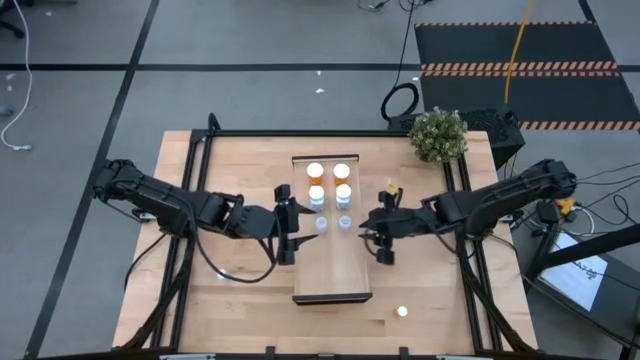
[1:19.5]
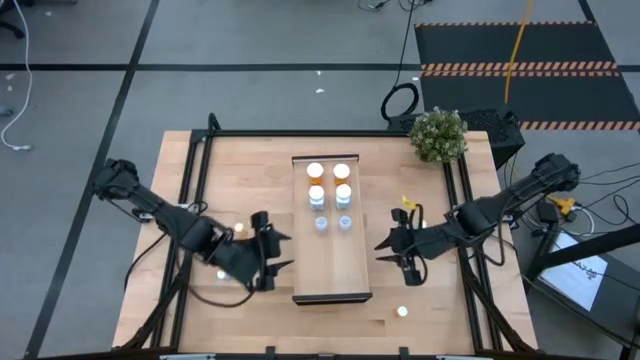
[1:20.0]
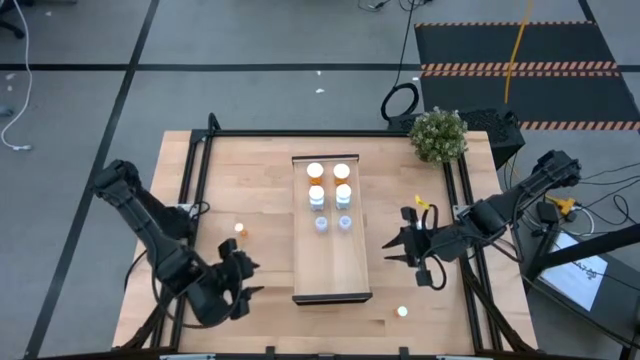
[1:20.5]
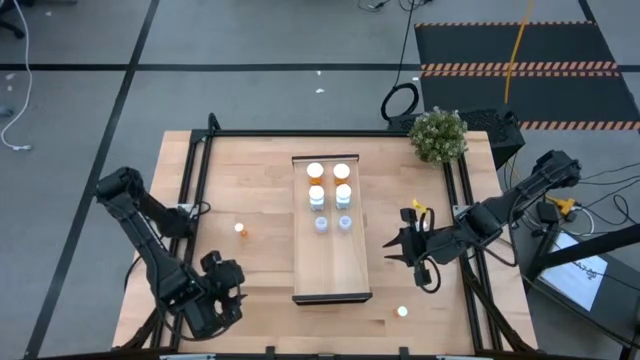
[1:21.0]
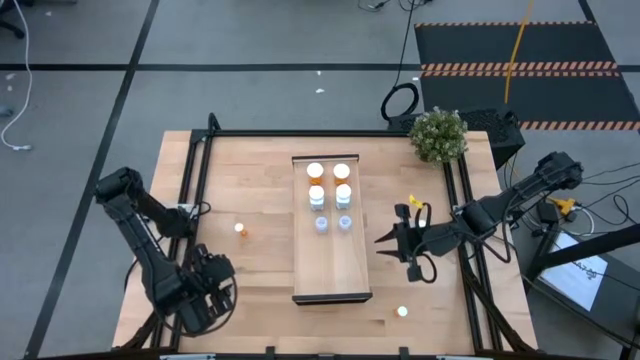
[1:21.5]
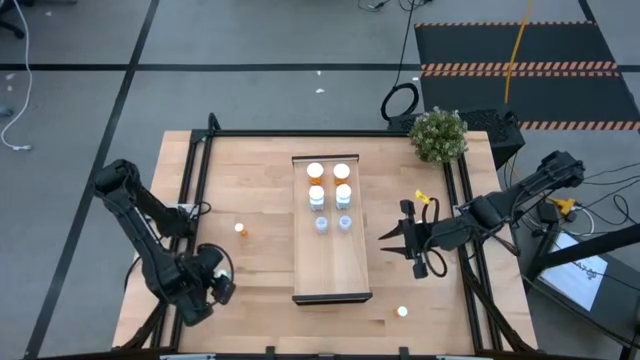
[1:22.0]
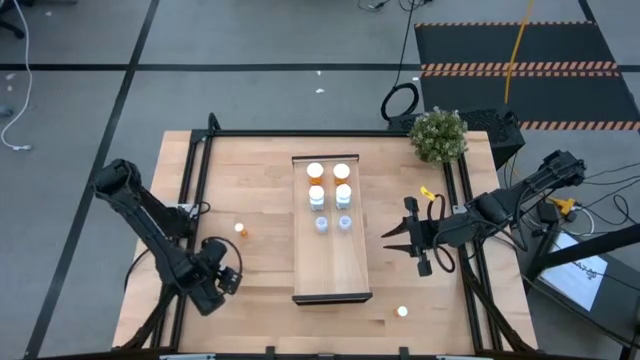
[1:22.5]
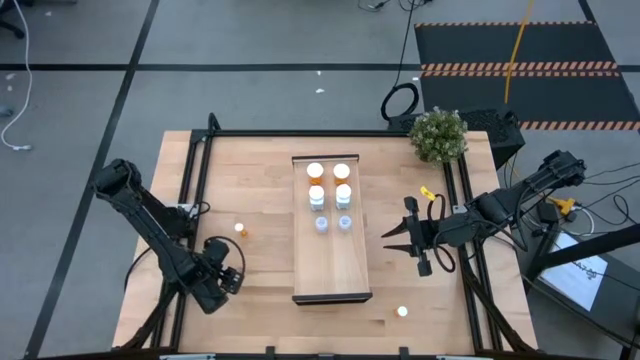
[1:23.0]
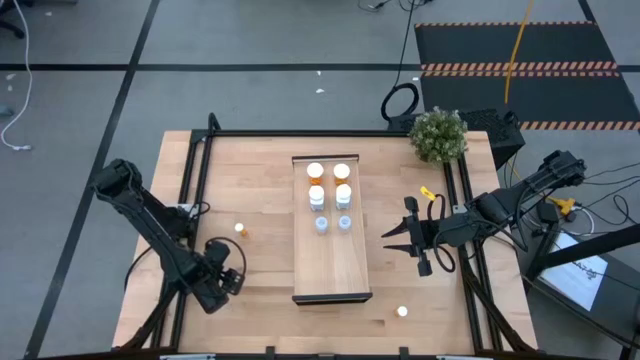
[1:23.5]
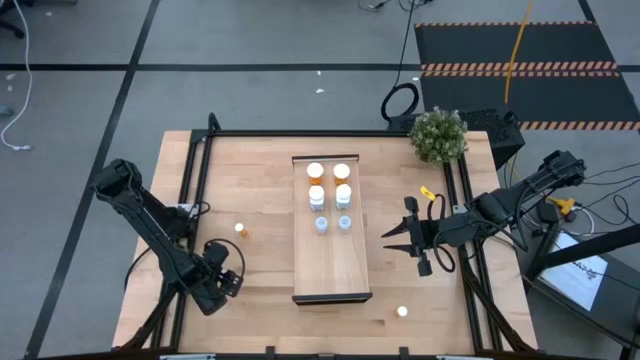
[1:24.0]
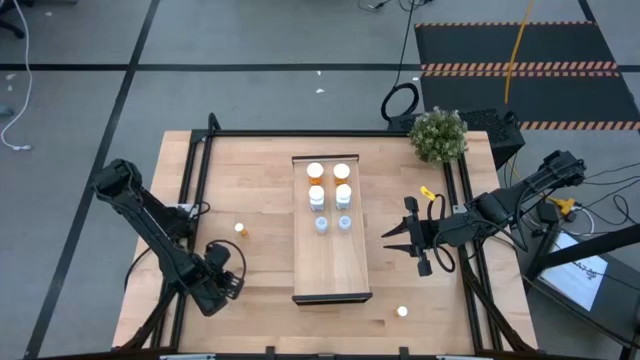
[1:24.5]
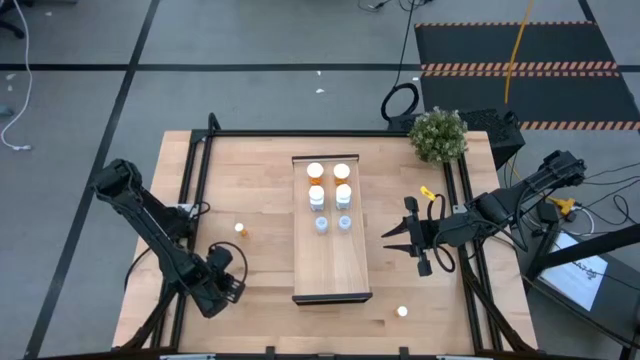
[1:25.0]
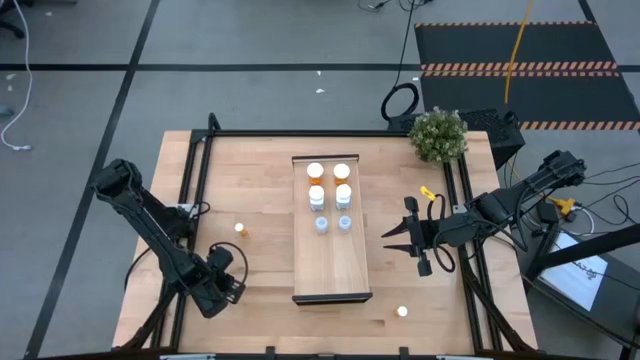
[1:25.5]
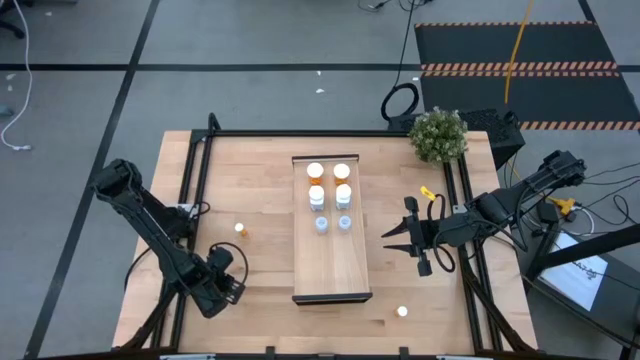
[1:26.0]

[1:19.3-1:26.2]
Task: Pick and place medicine bottles onto shelf by color
Put the bottom blue pill bottle on the shelf

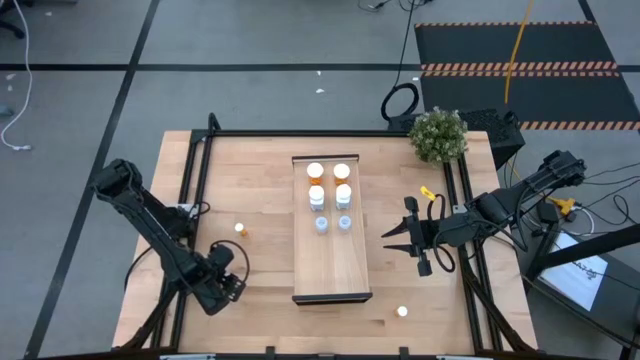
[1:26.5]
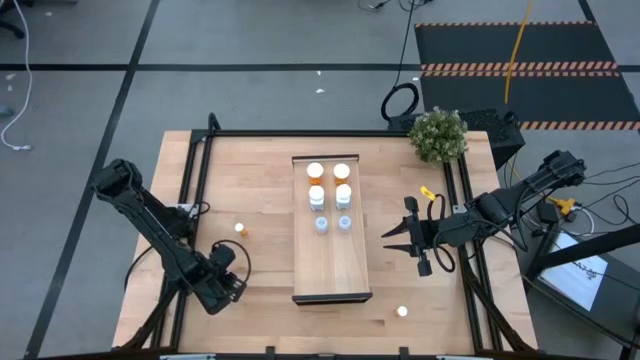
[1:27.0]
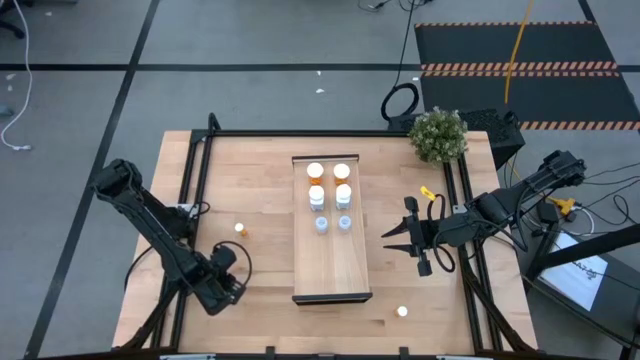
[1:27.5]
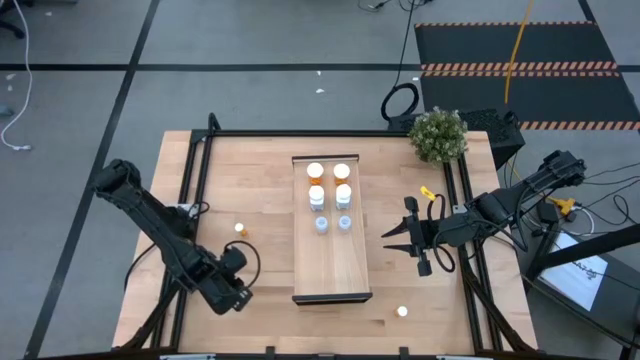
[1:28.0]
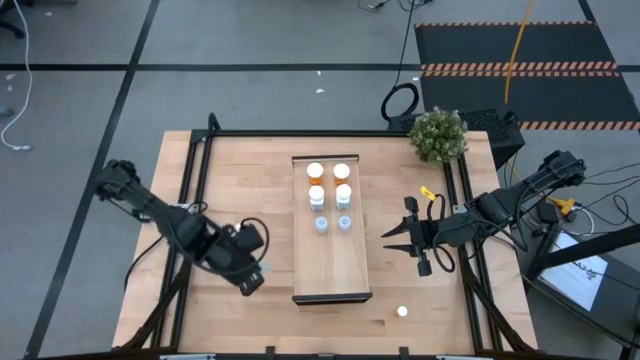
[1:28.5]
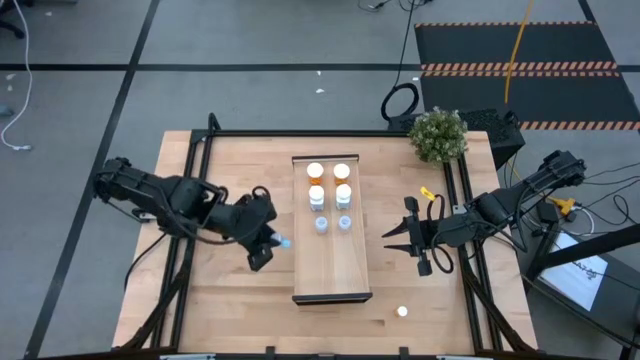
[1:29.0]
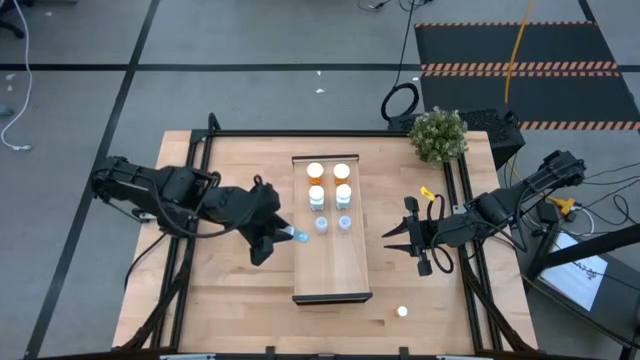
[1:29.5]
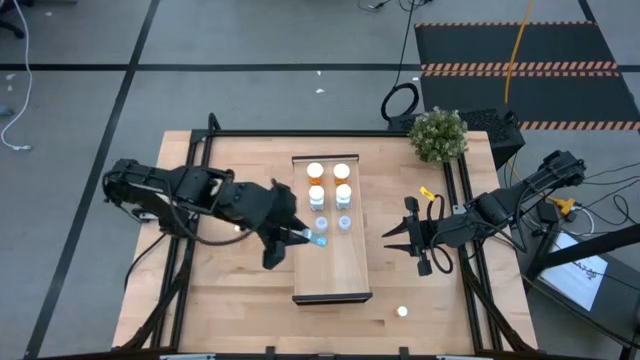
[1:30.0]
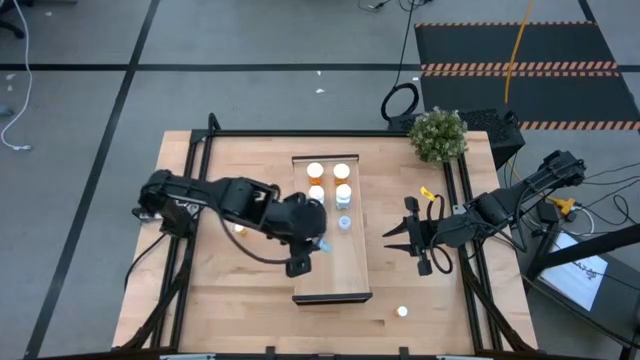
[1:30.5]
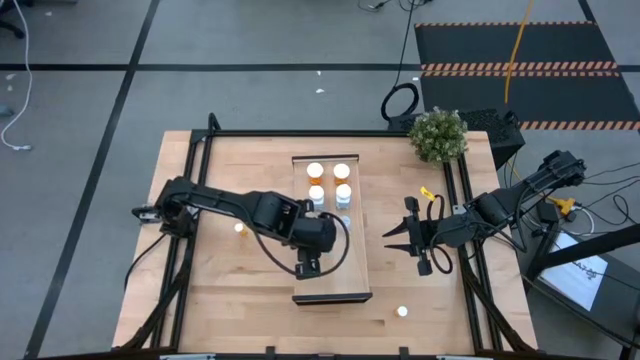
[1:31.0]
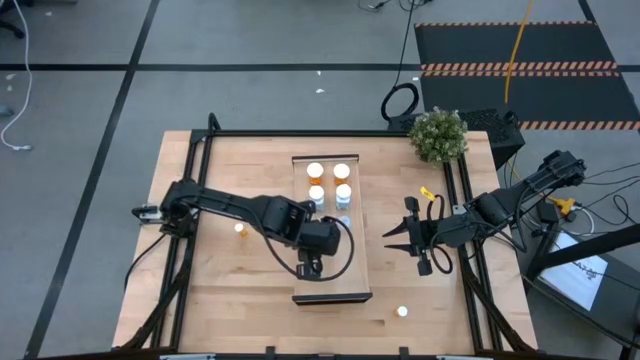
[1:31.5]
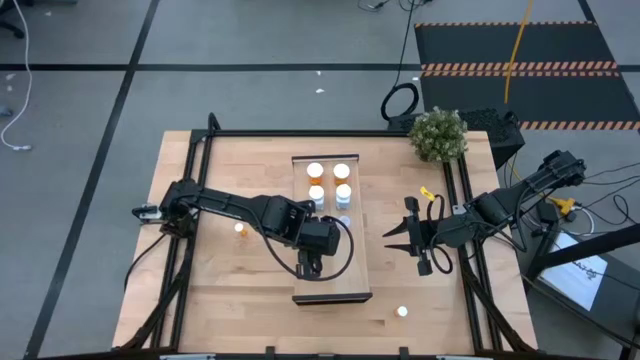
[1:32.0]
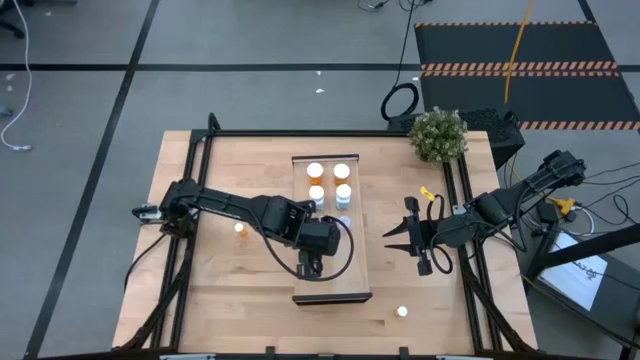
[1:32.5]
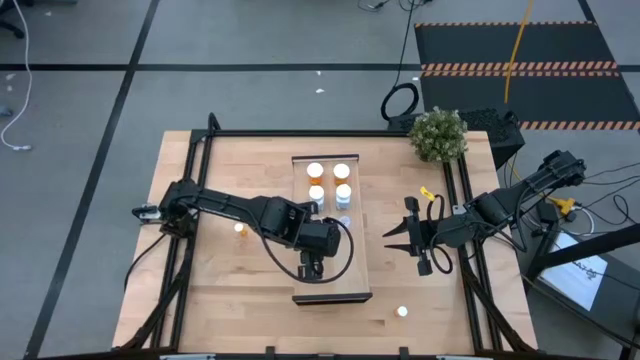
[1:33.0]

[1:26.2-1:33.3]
Put the bottom blue pill bottle on the shelf

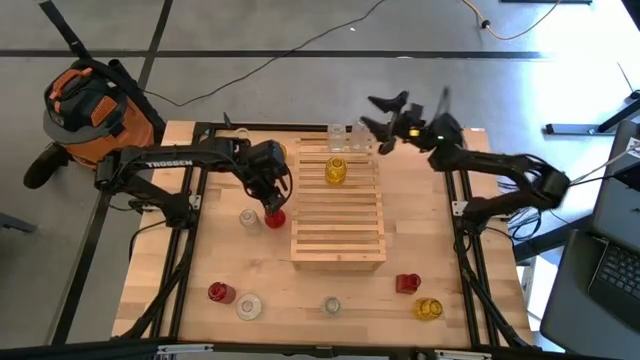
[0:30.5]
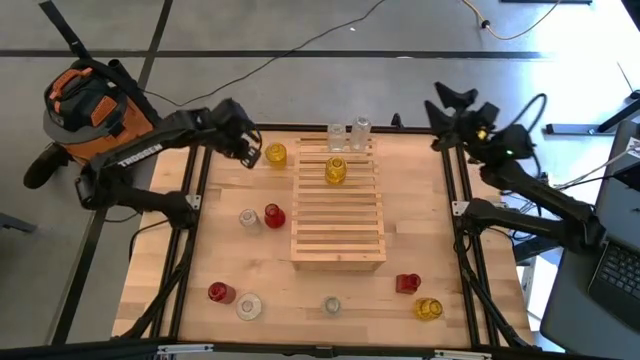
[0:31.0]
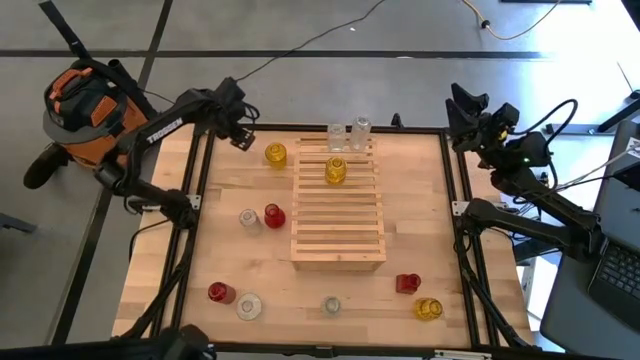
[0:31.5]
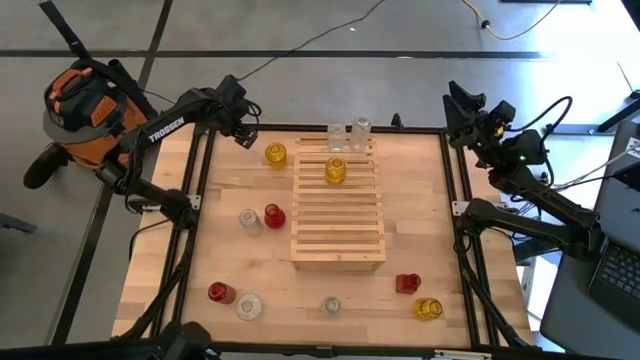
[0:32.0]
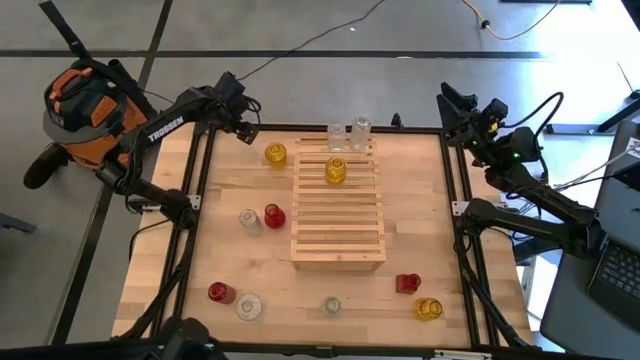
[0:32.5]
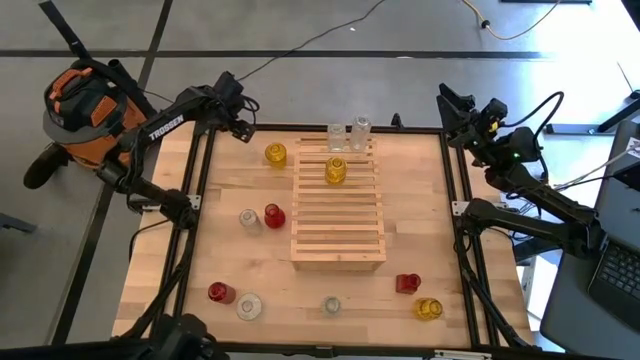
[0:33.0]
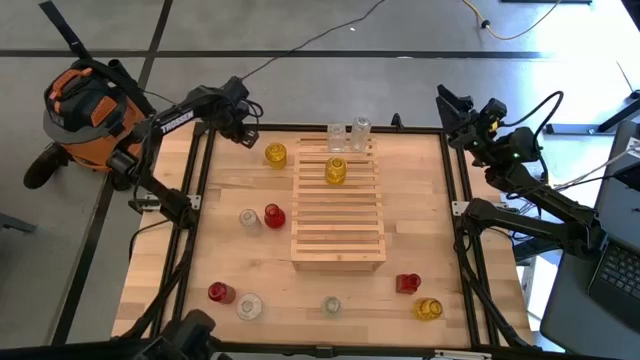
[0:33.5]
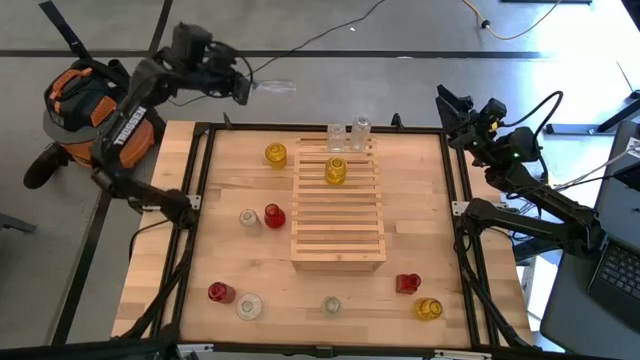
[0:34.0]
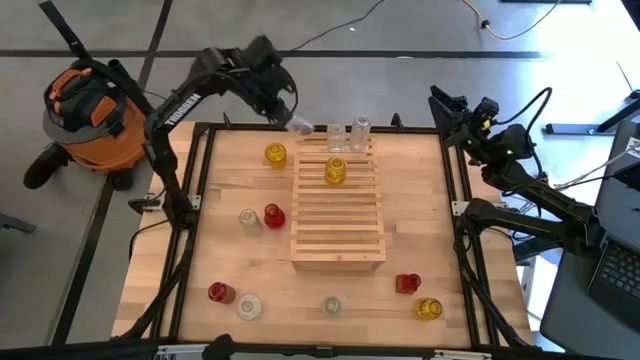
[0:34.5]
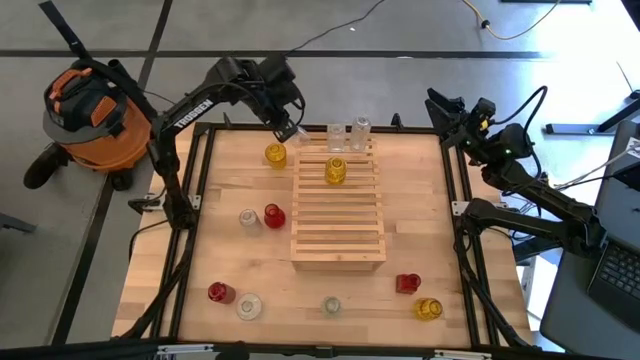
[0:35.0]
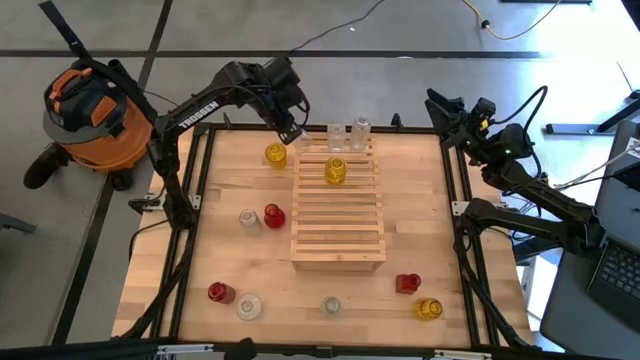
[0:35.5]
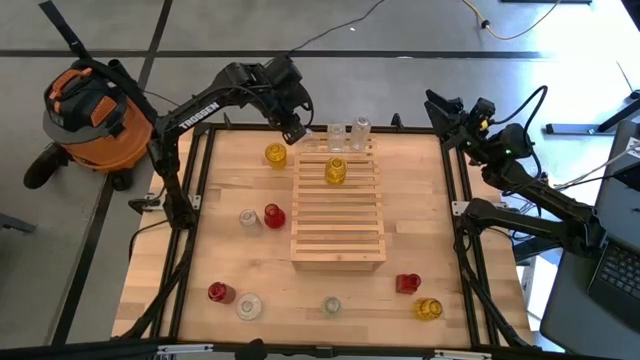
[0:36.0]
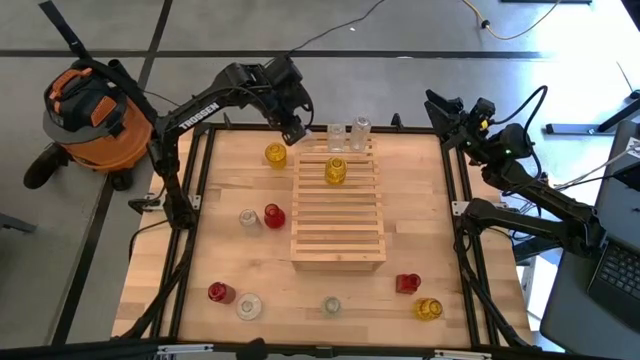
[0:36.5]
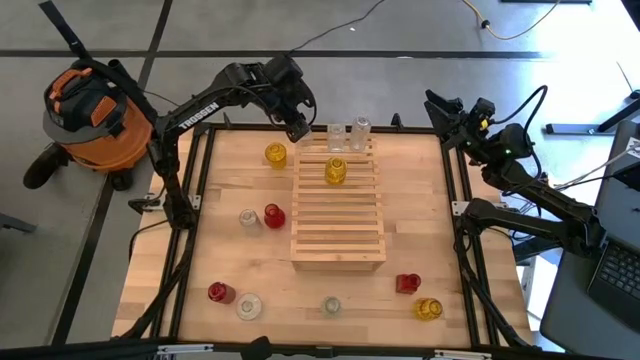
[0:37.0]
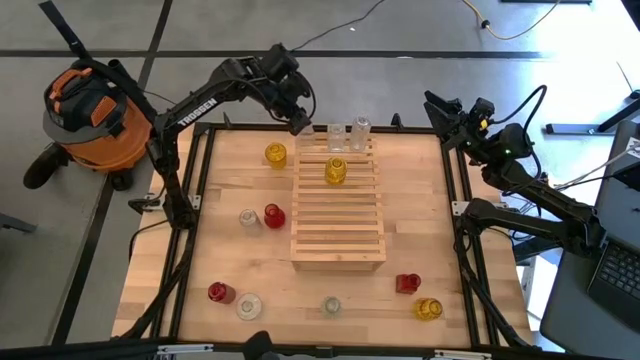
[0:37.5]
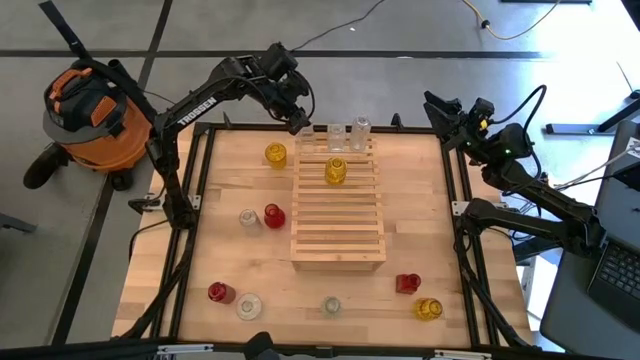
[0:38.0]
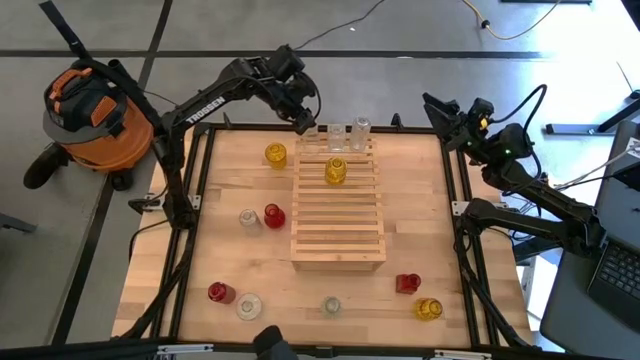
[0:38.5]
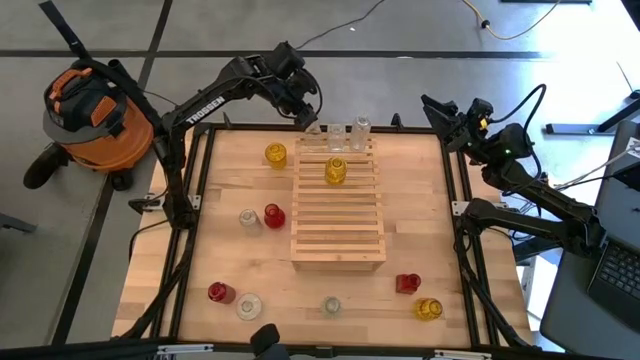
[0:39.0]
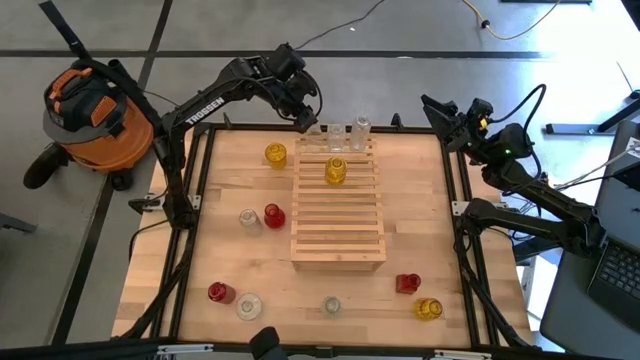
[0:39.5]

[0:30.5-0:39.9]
Task: sort vases onto shelf
Align the transparent vase with the transparent vases on the shelf
